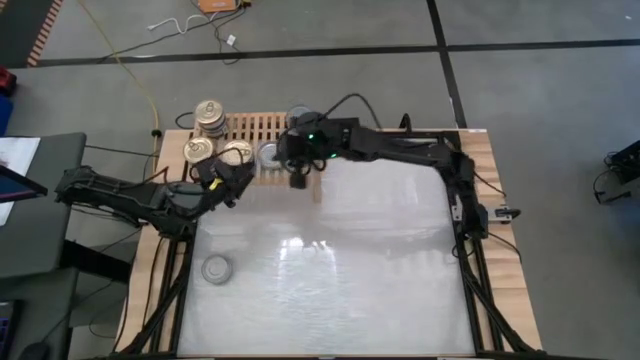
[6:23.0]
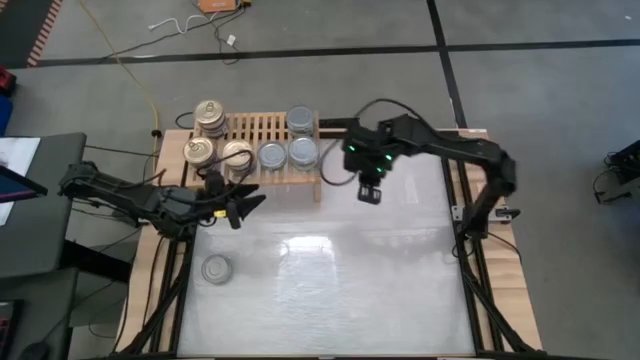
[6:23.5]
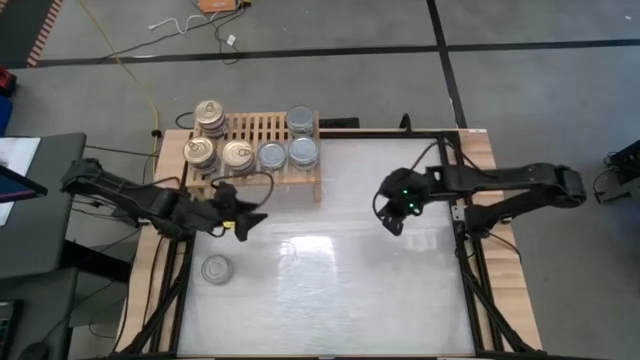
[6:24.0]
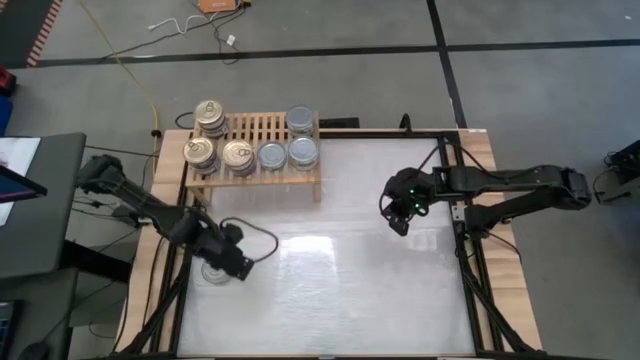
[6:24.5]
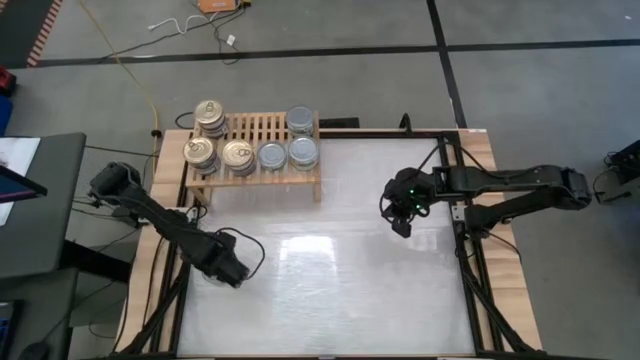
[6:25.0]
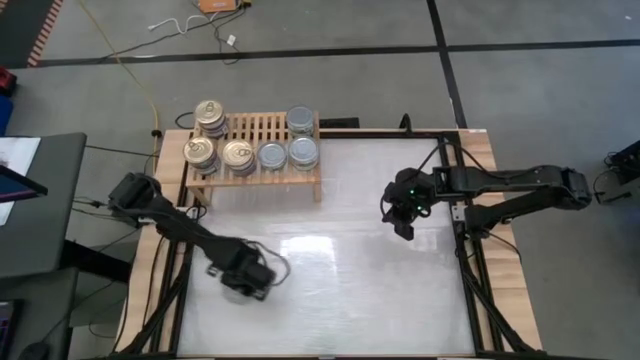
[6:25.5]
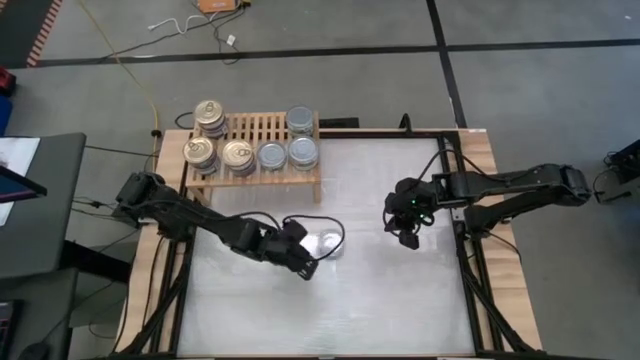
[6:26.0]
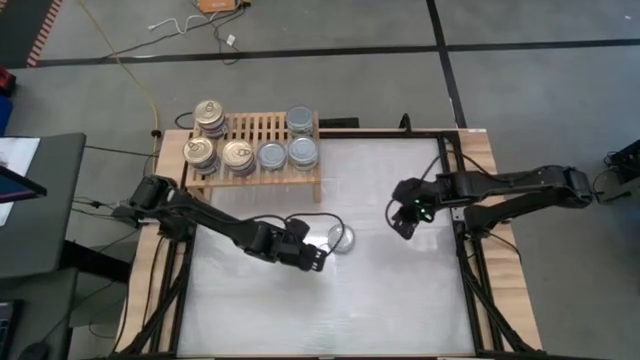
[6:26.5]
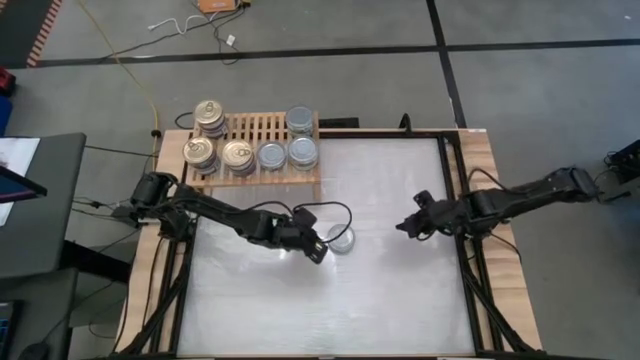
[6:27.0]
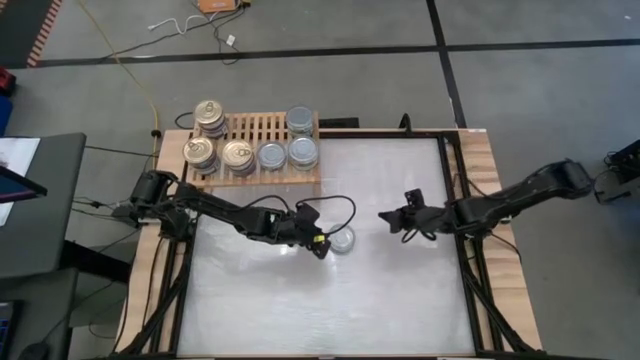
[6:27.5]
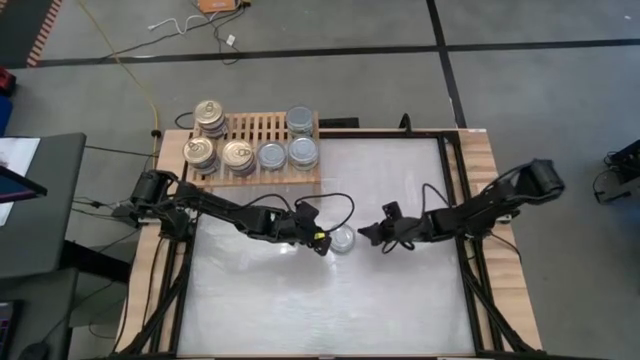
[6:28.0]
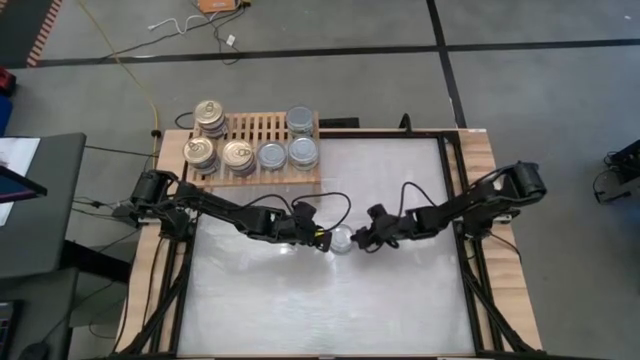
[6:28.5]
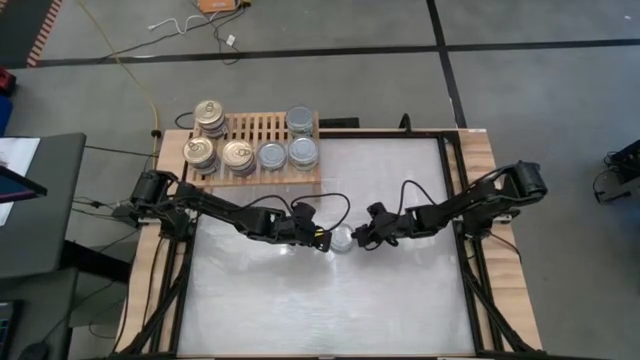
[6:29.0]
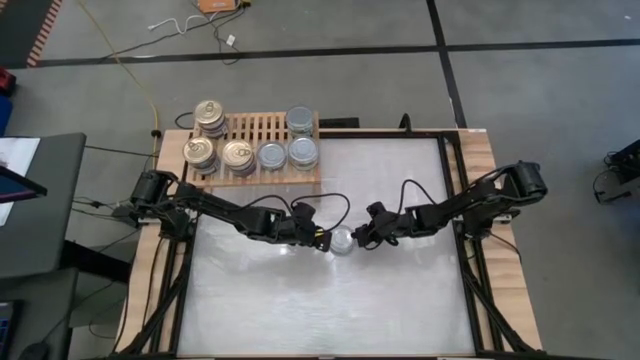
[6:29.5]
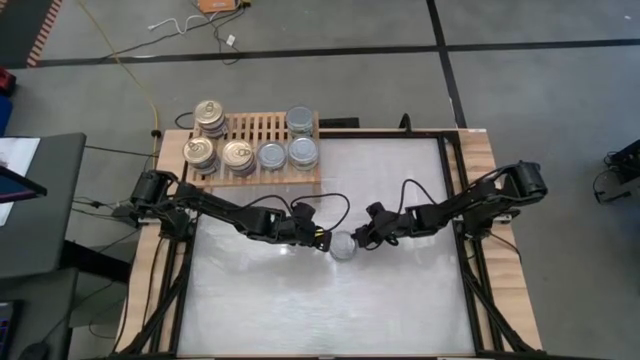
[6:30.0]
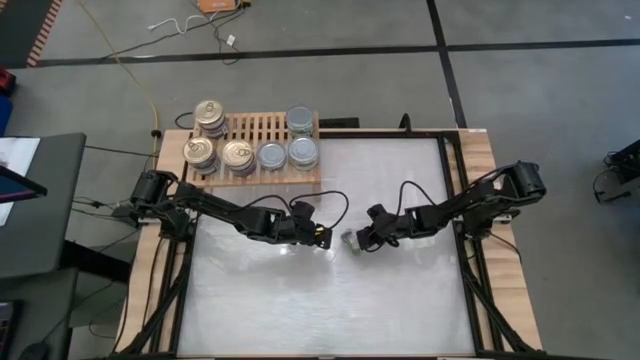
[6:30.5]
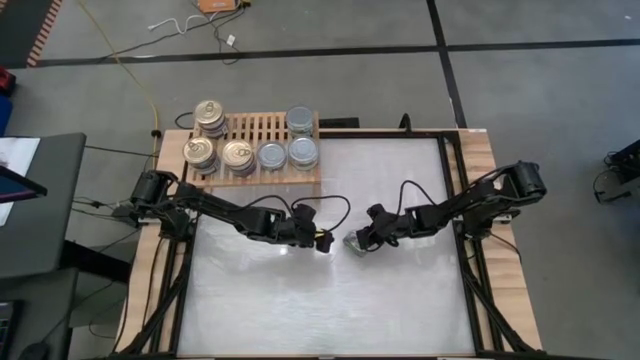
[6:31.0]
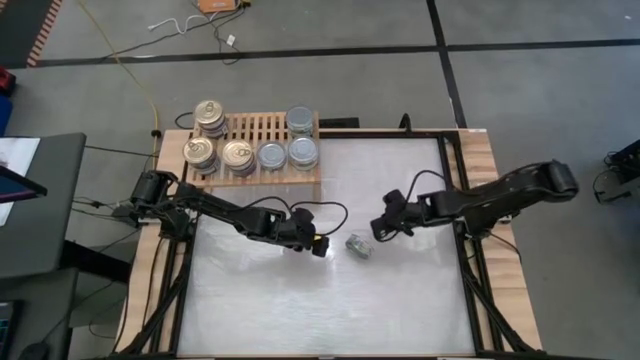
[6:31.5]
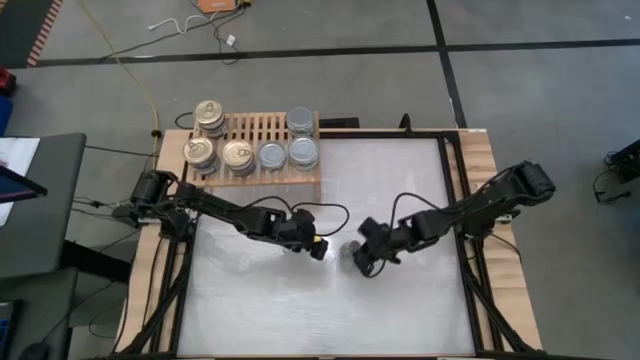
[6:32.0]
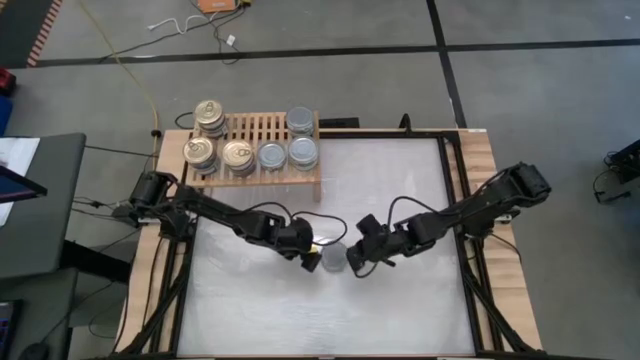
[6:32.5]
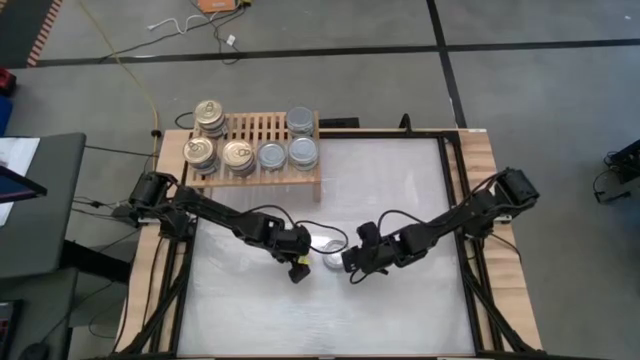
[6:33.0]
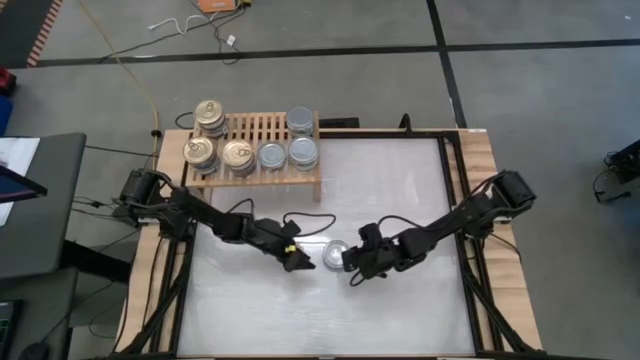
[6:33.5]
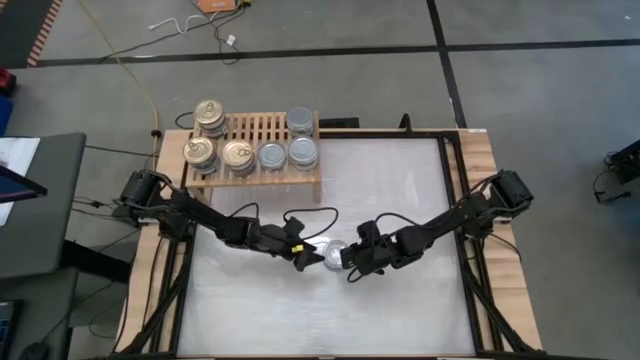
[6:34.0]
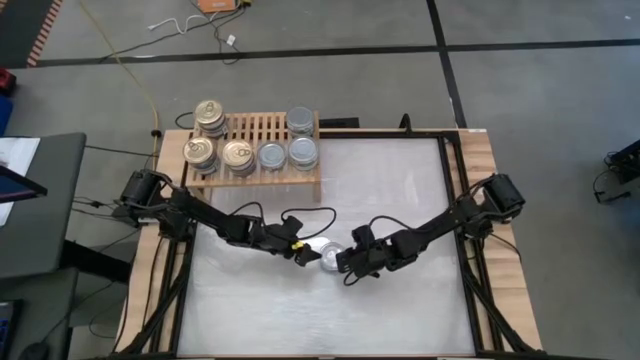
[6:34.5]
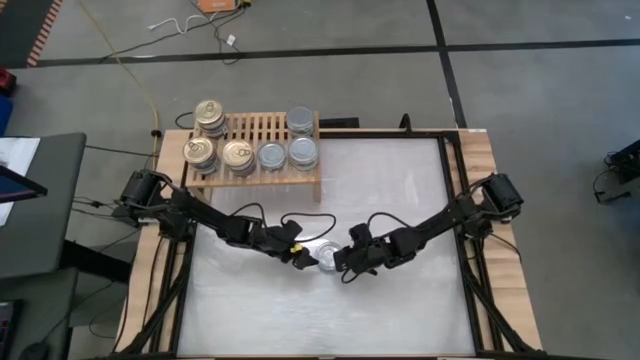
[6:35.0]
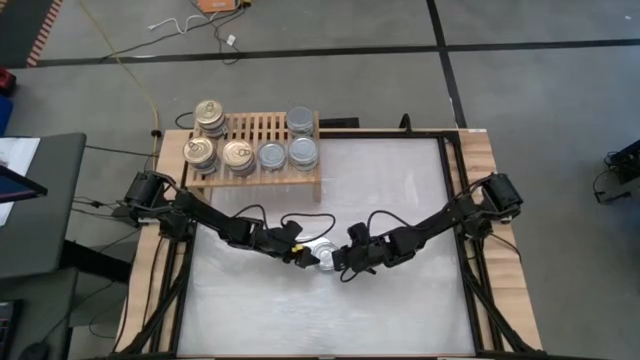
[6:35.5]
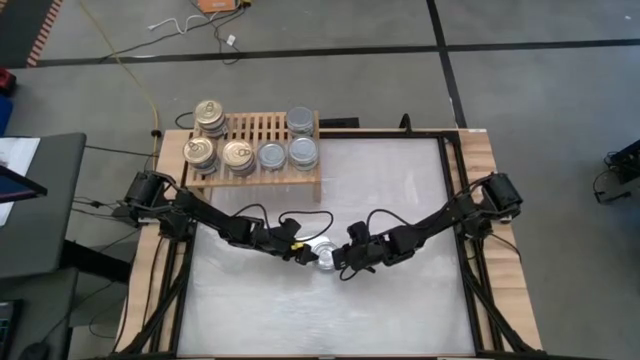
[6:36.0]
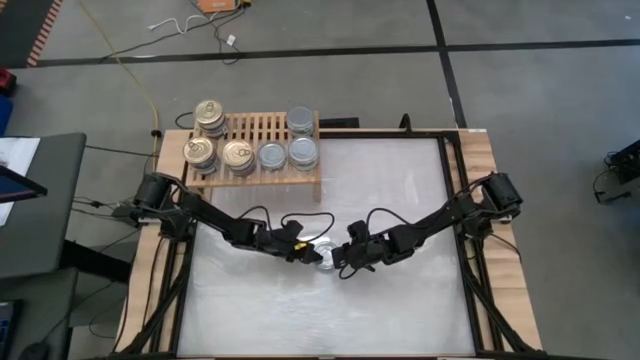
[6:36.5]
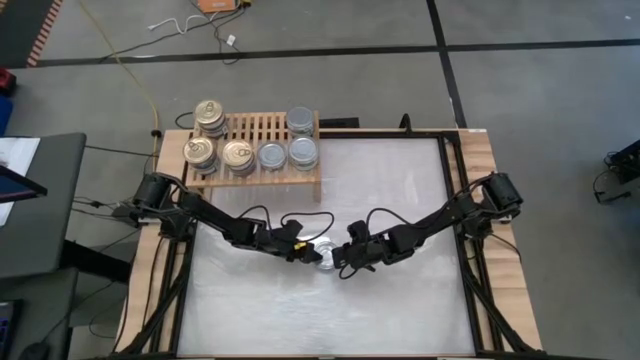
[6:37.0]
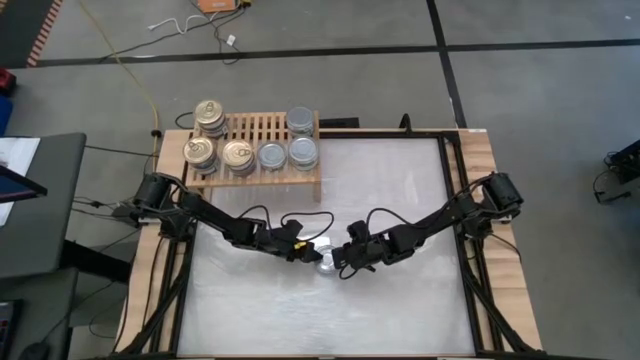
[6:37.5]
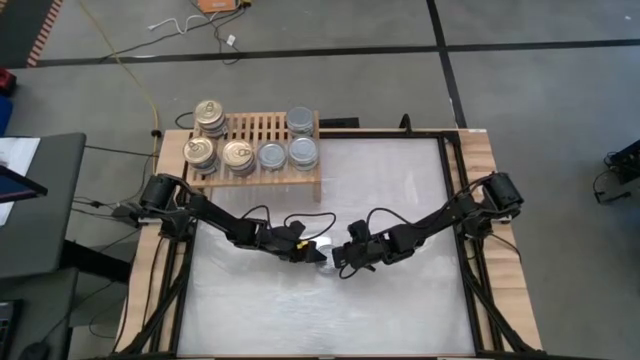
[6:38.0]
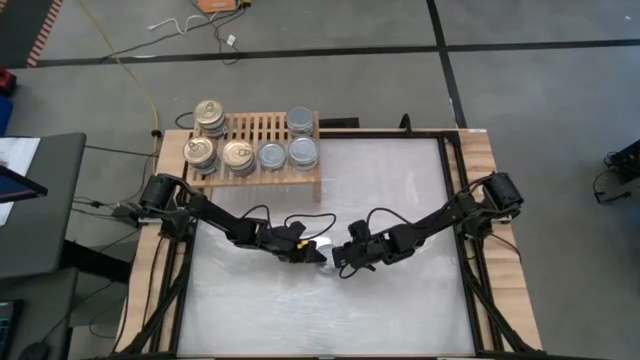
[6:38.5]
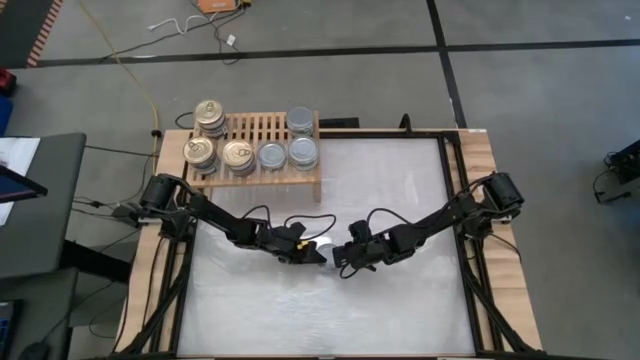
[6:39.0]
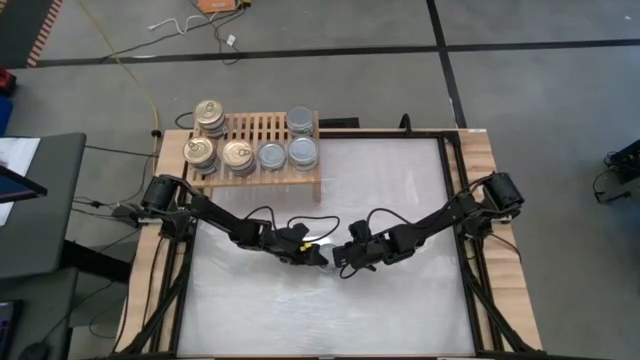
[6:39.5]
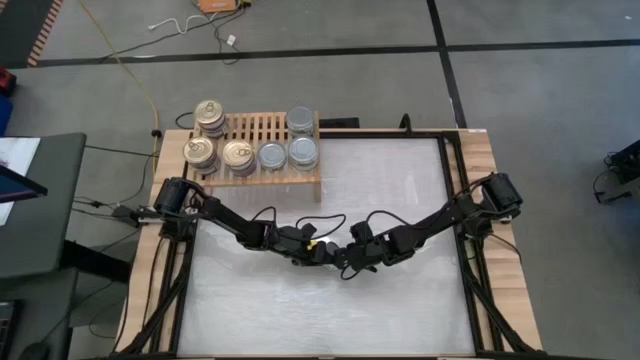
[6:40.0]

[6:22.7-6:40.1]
Task: Stack canned seafood by type on shelf
Stack the green tuna can on top of the bottom left green tuna can on the shelf

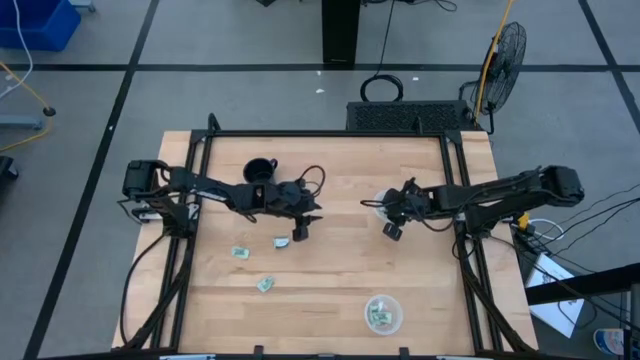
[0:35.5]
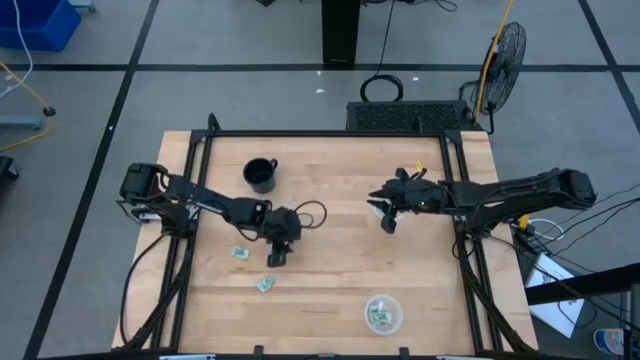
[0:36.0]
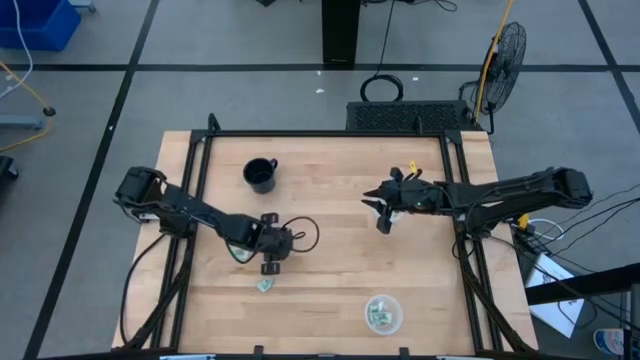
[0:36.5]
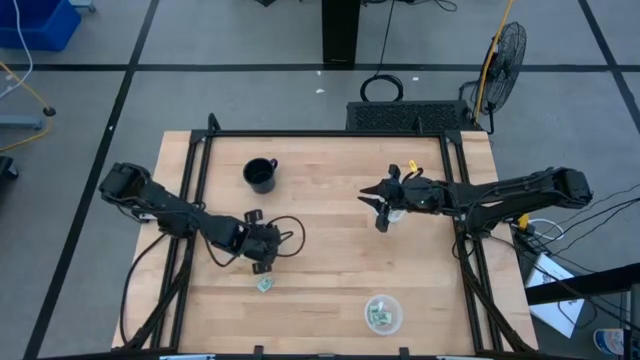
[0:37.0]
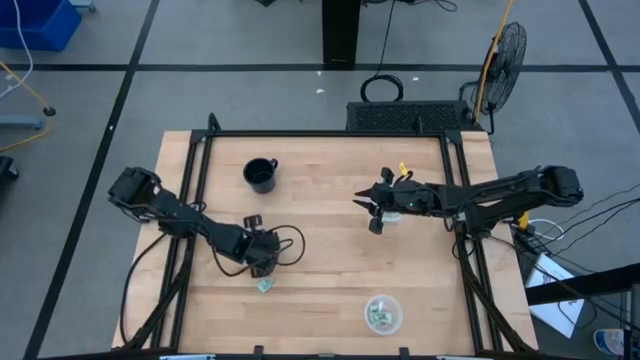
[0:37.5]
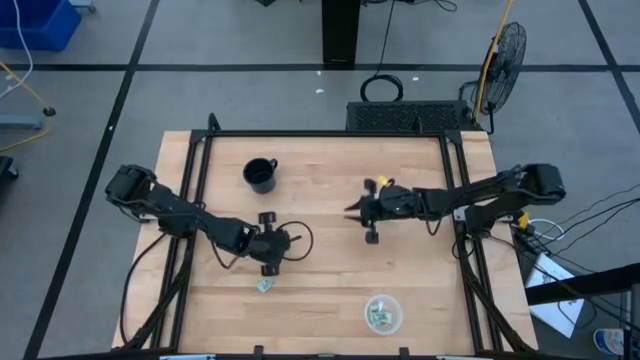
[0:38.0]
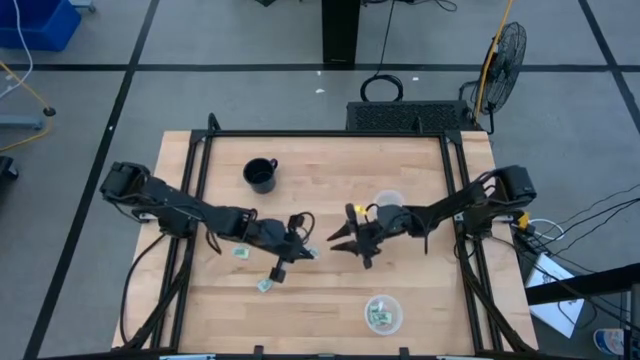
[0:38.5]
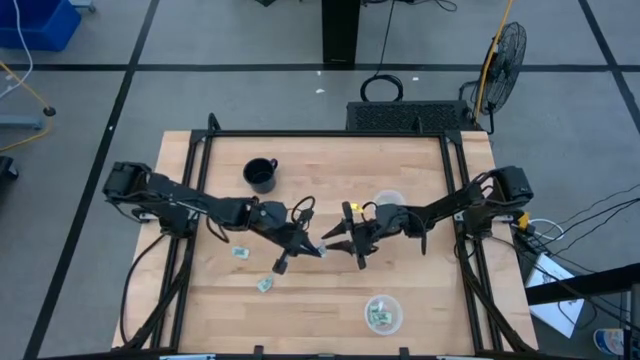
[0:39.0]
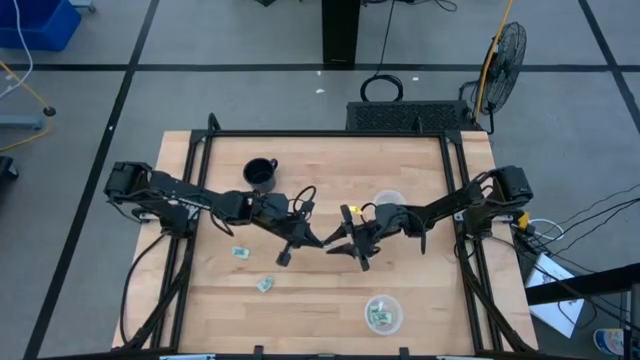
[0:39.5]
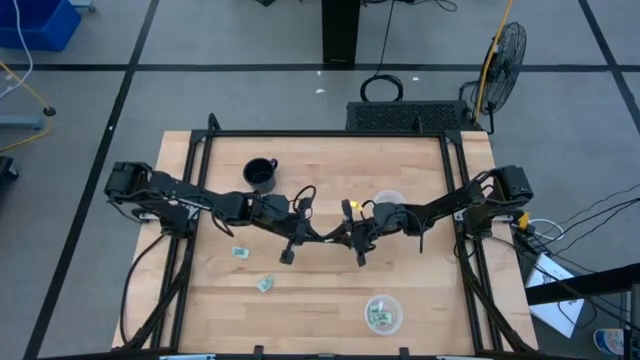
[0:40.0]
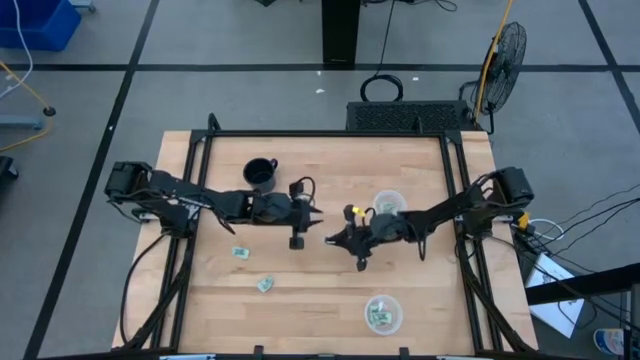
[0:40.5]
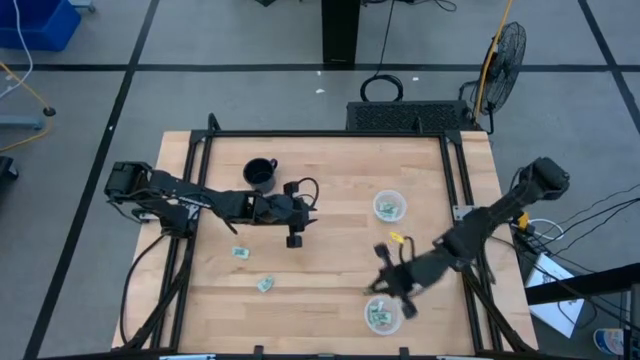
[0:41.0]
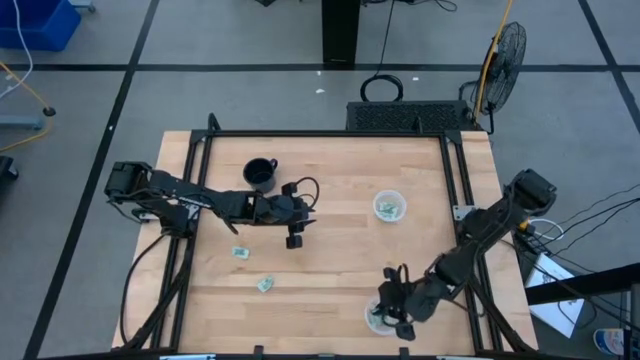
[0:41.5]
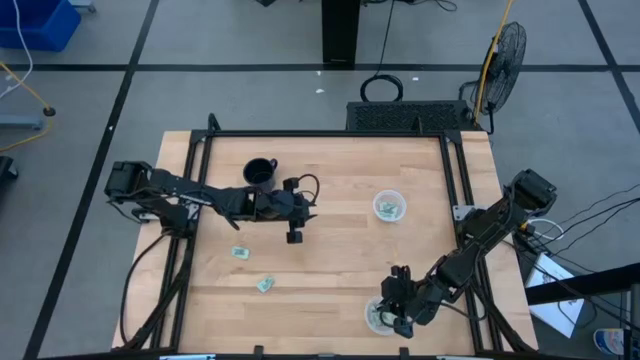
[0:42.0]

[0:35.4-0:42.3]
Task: Pick and place Stevia / Truvia into bins
Put the green stevia packet into the bottom transparent container
